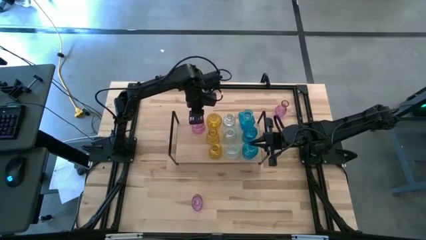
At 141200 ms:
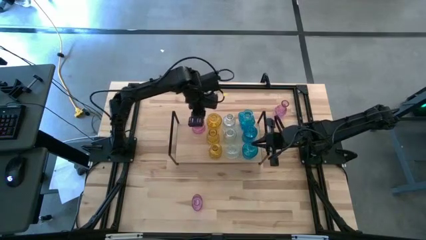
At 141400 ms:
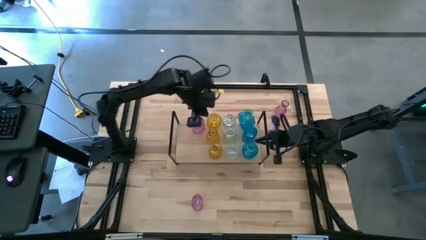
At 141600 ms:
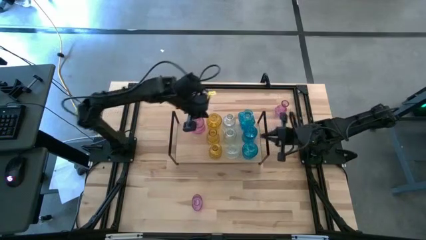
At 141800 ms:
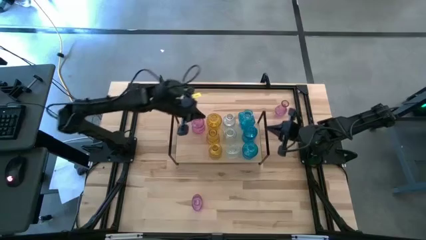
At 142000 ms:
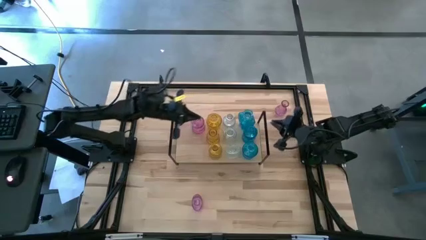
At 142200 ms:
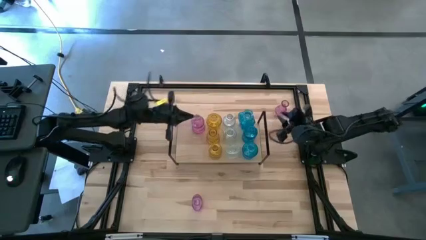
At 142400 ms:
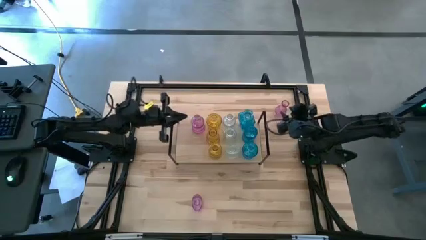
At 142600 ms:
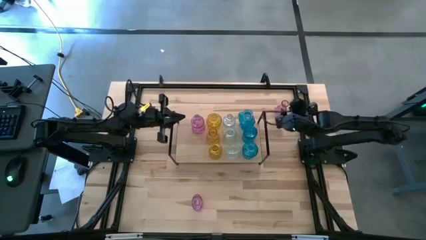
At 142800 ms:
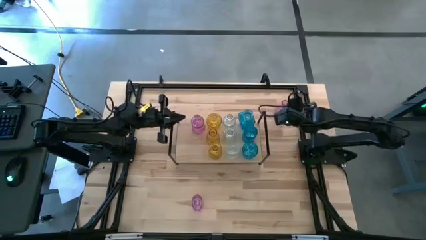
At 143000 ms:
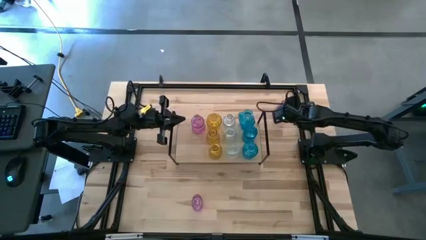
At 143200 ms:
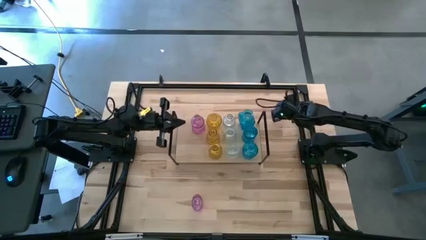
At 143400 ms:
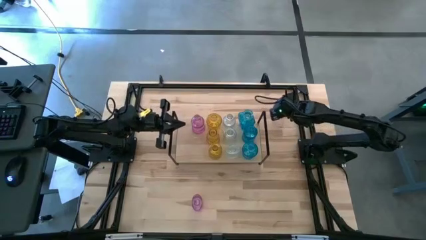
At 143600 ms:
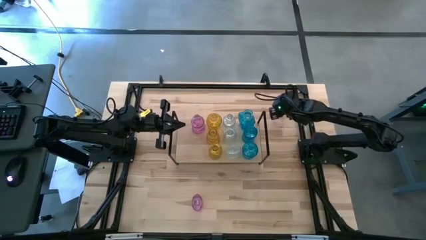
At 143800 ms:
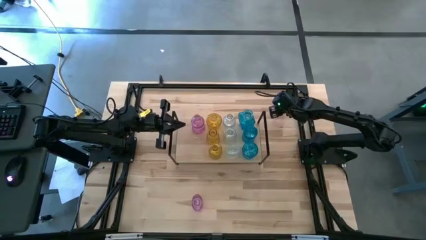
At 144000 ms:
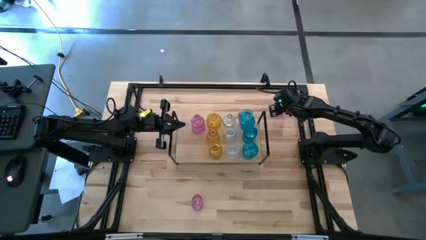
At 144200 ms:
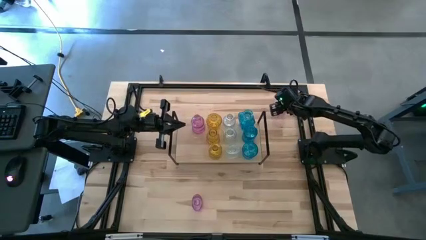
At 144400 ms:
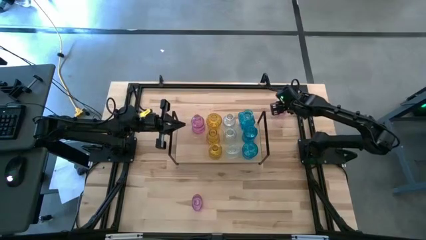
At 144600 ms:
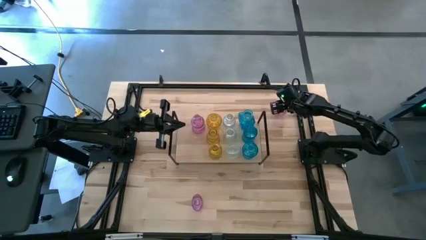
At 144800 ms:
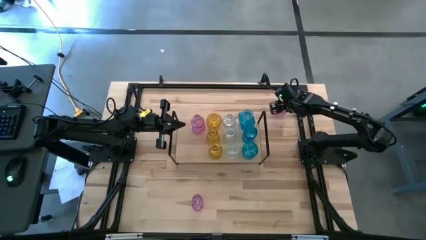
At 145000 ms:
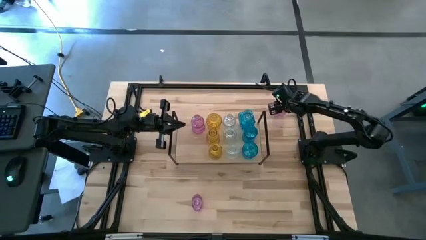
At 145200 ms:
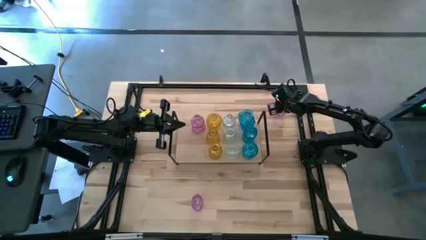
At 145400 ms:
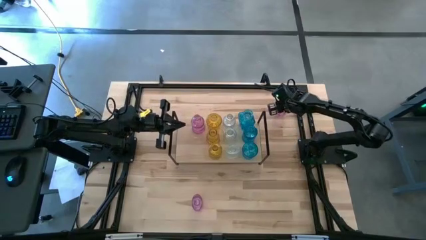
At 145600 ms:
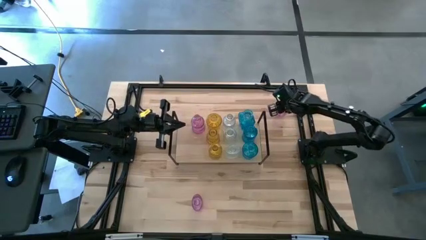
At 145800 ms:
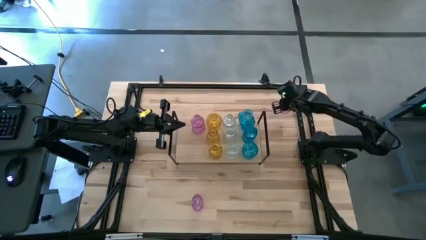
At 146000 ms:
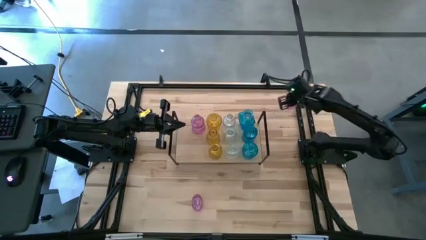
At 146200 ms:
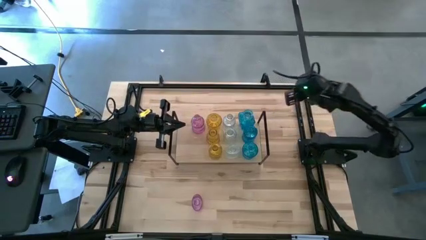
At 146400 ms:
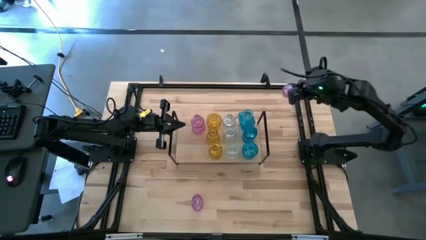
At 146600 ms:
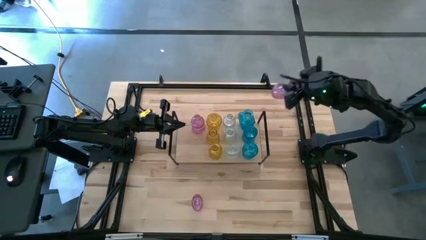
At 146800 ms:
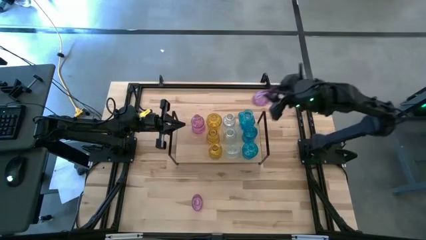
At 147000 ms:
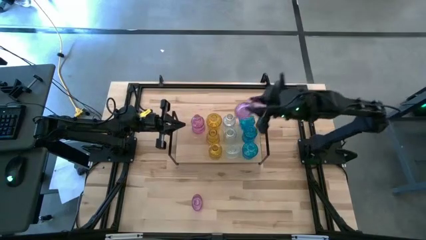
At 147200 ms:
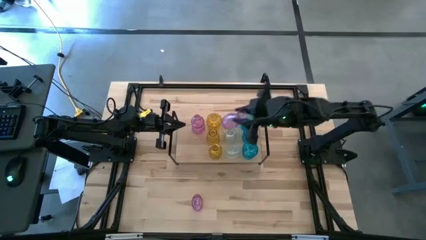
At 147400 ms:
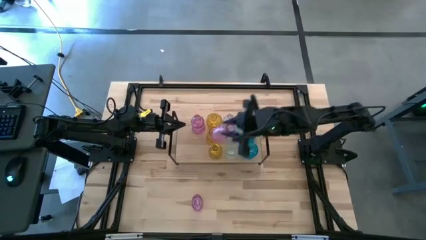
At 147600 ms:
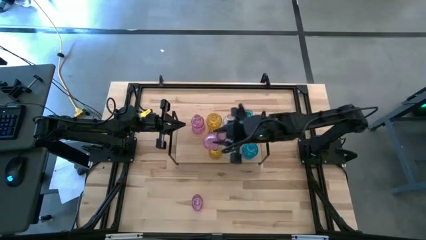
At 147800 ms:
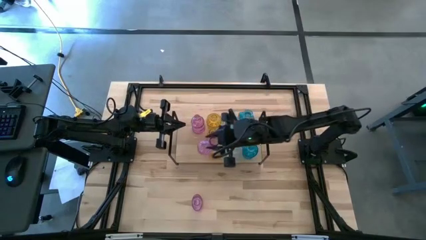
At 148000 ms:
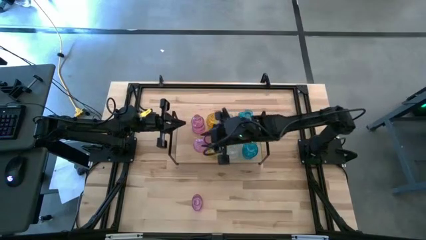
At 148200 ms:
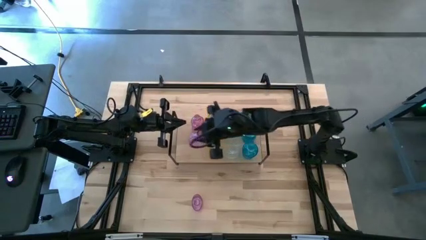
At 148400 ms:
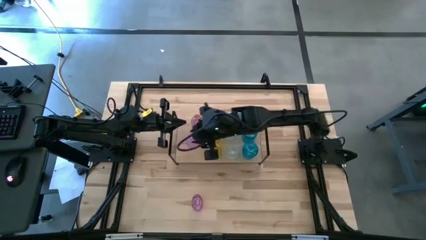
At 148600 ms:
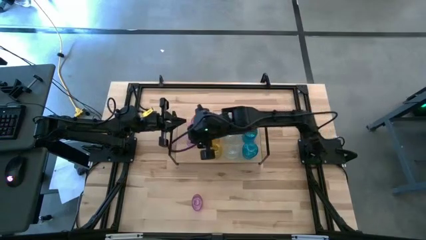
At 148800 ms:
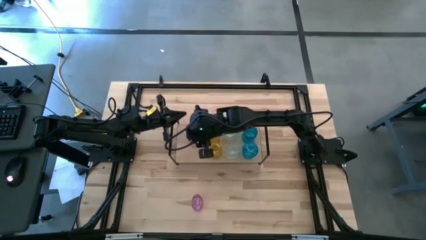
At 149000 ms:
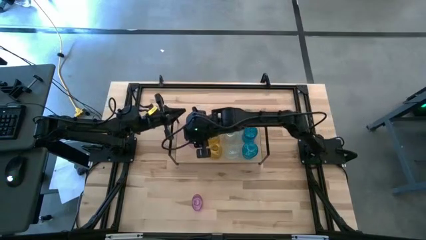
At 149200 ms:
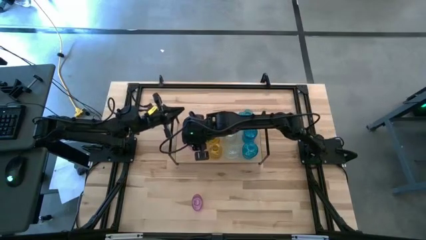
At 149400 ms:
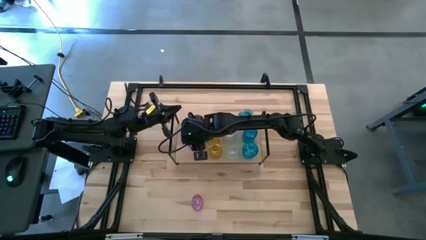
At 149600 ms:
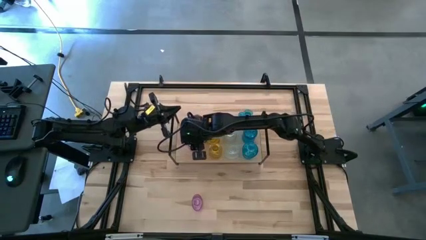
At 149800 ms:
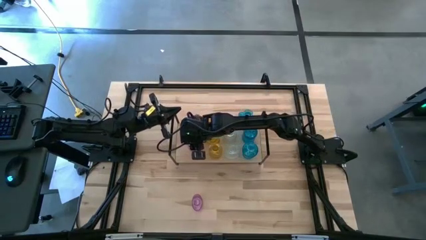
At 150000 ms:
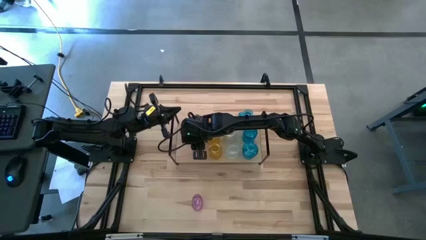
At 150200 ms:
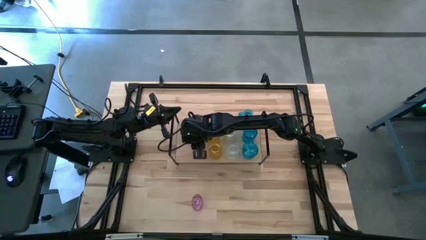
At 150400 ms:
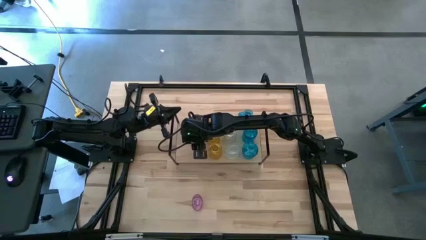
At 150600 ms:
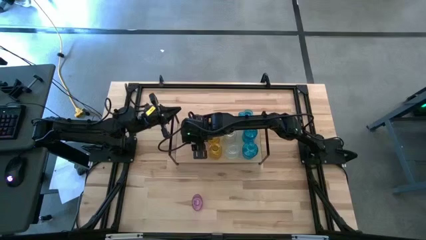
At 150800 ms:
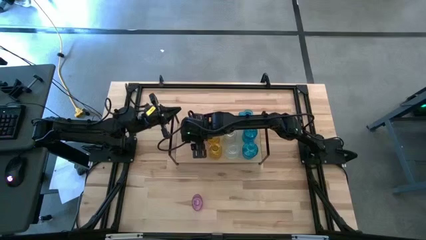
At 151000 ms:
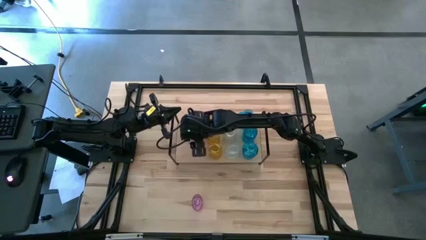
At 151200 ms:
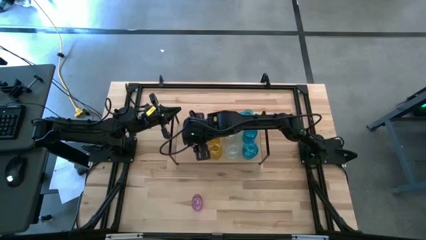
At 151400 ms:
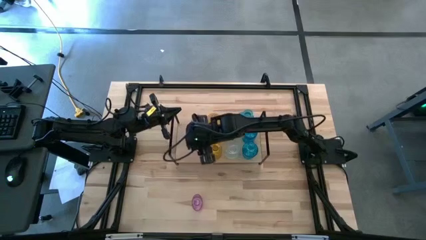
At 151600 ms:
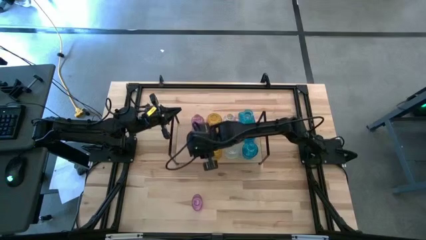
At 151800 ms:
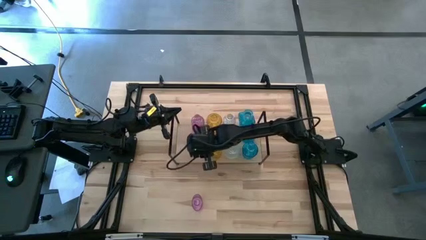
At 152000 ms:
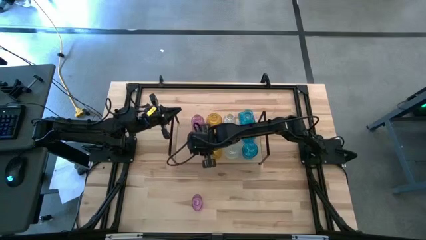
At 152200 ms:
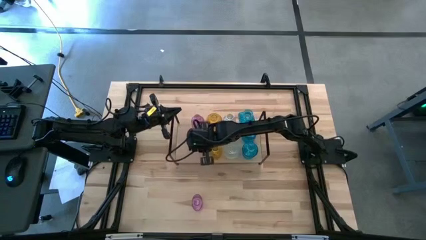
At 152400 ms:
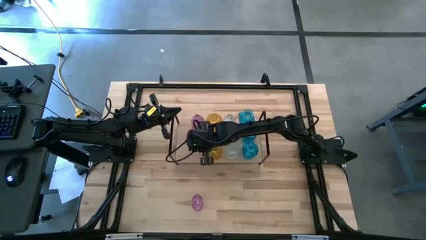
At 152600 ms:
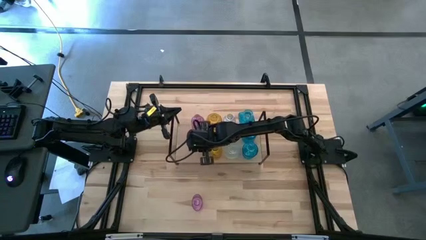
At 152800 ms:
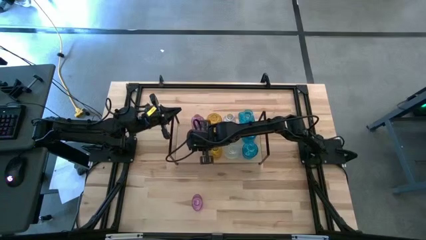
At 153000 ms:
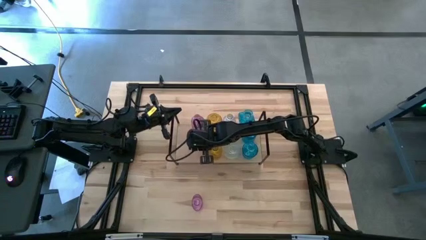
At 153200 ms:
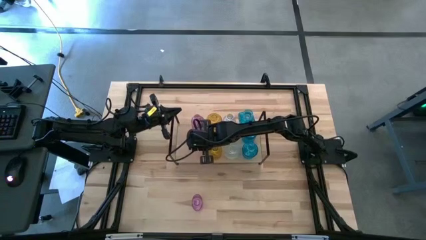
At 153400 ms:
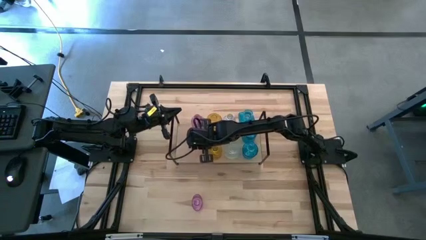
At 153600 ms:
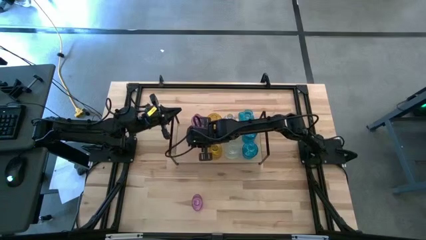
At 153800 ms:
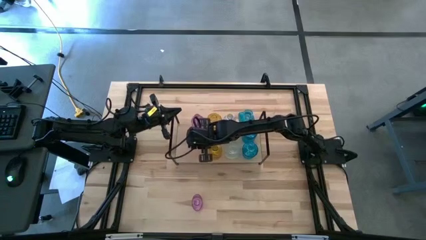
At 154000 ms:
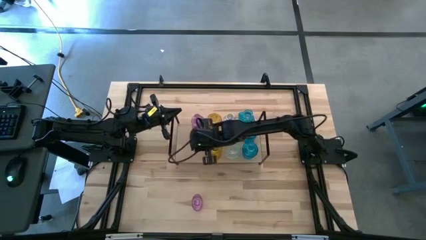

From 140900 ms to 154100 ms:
Task: sort vases onto shelf
Put the top purple vase aligned with the other purple vase on the shelf
